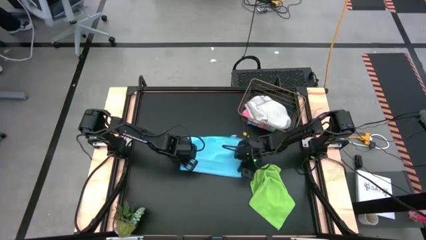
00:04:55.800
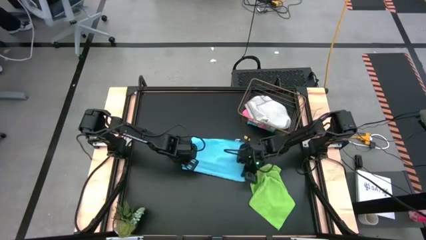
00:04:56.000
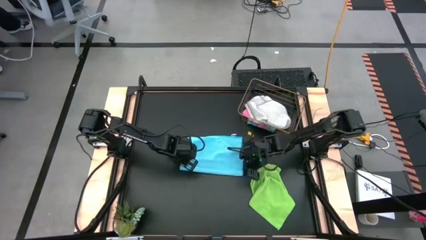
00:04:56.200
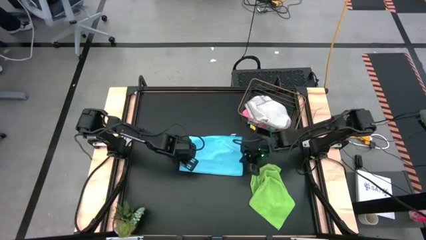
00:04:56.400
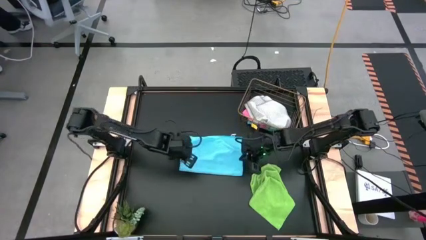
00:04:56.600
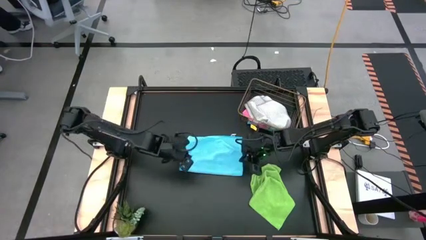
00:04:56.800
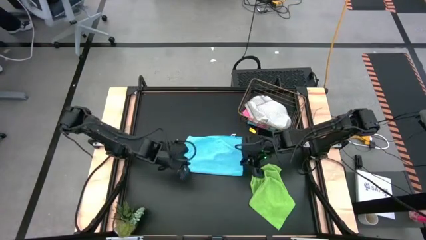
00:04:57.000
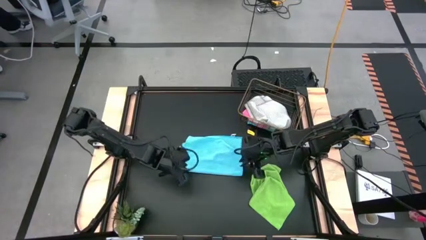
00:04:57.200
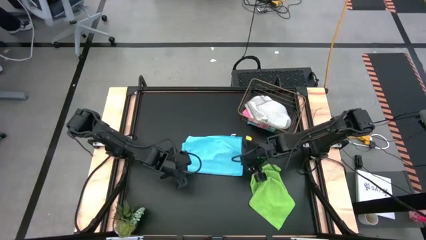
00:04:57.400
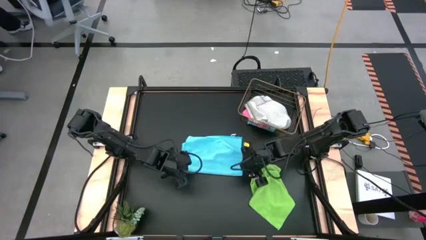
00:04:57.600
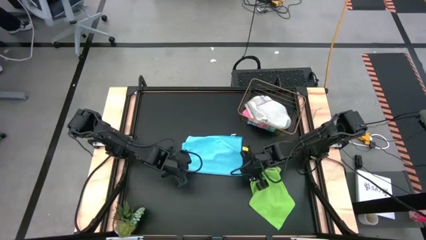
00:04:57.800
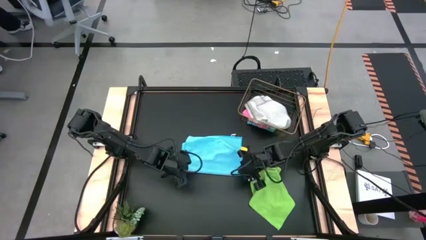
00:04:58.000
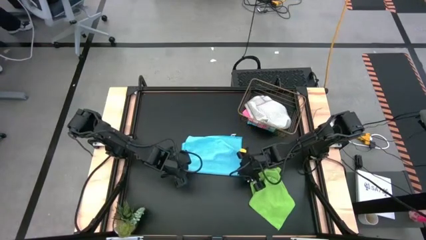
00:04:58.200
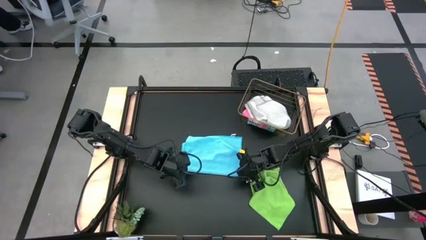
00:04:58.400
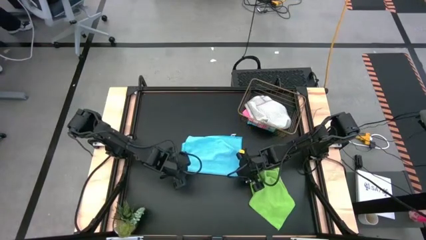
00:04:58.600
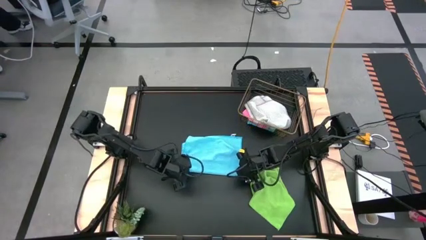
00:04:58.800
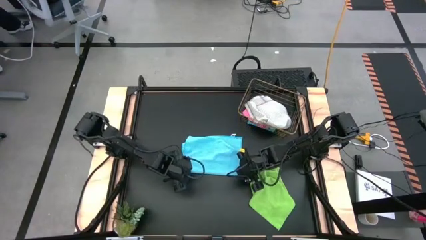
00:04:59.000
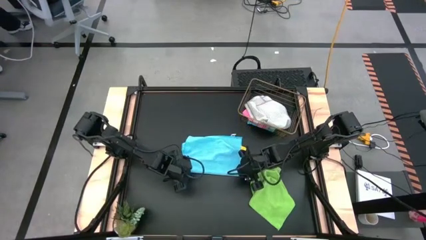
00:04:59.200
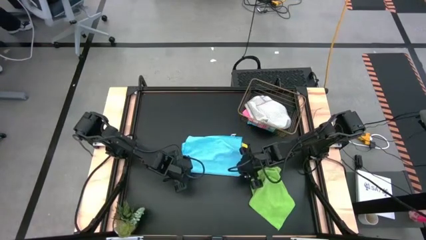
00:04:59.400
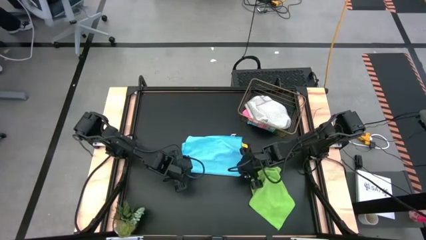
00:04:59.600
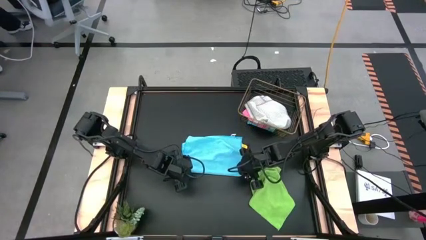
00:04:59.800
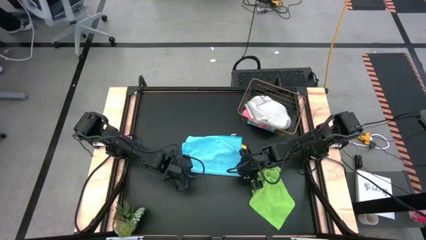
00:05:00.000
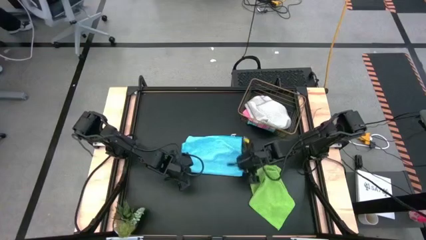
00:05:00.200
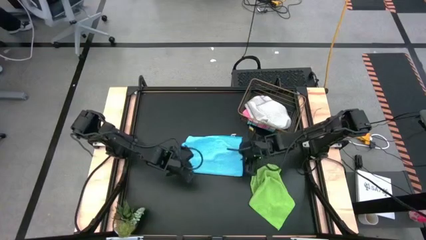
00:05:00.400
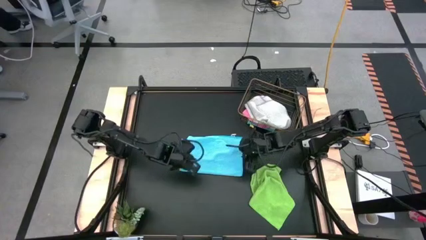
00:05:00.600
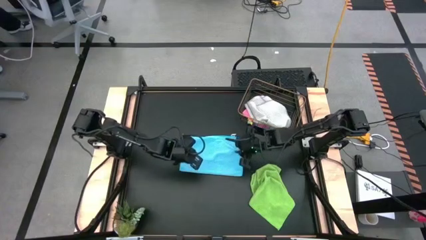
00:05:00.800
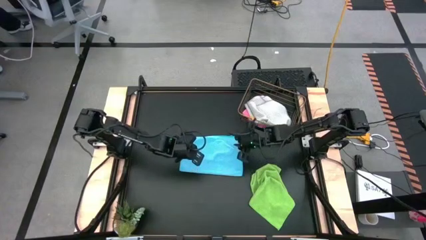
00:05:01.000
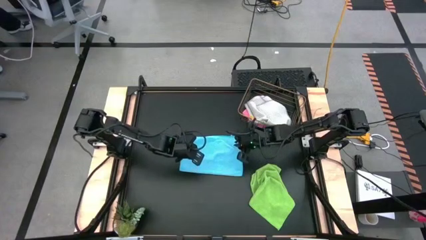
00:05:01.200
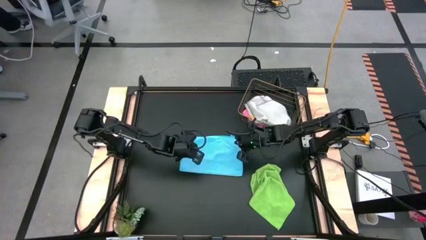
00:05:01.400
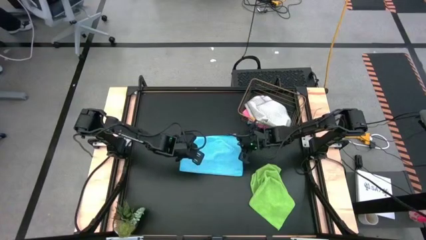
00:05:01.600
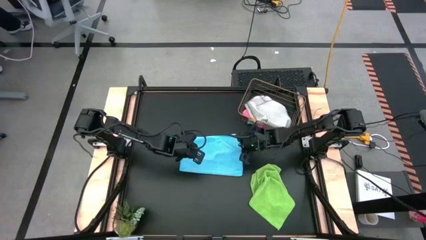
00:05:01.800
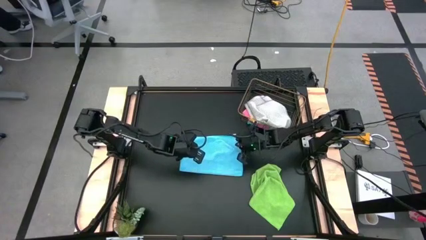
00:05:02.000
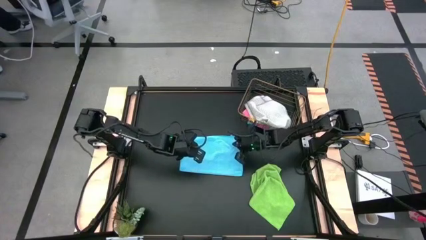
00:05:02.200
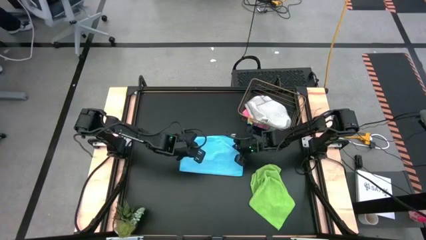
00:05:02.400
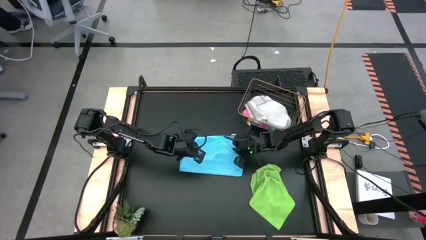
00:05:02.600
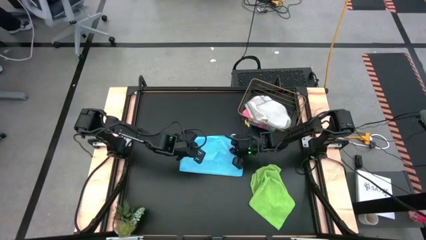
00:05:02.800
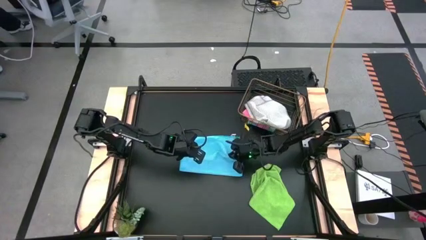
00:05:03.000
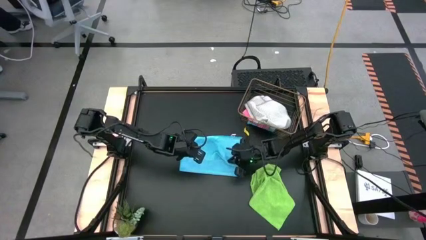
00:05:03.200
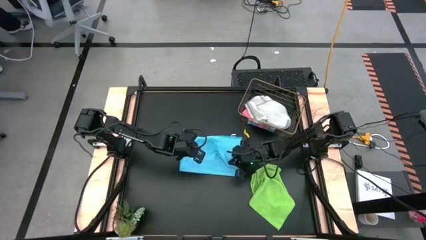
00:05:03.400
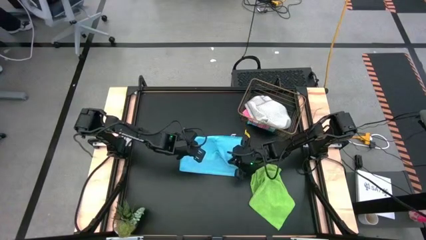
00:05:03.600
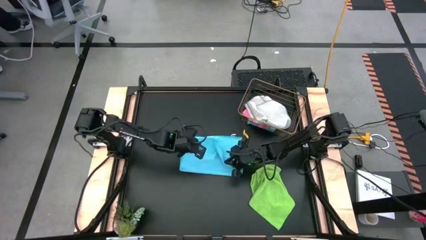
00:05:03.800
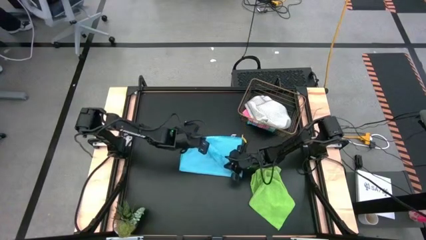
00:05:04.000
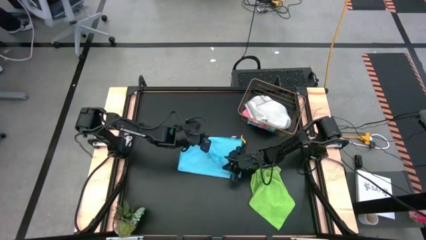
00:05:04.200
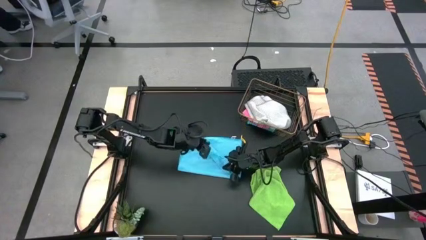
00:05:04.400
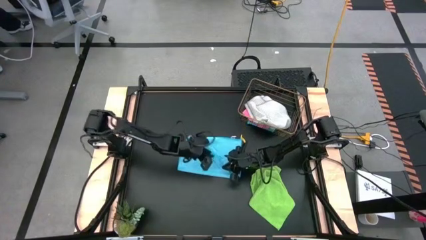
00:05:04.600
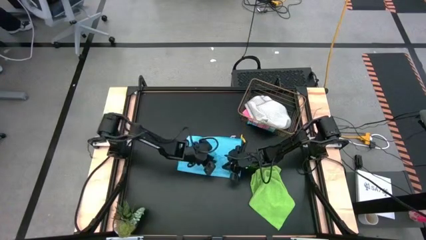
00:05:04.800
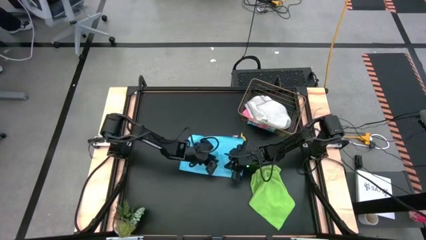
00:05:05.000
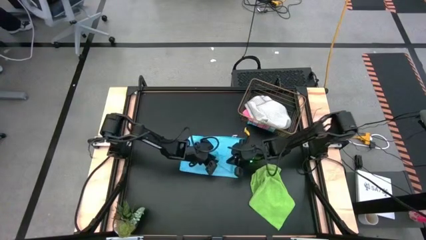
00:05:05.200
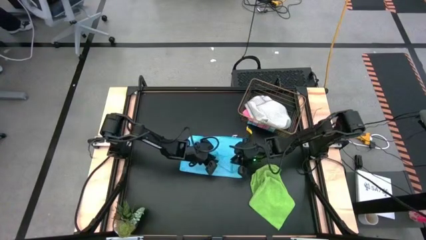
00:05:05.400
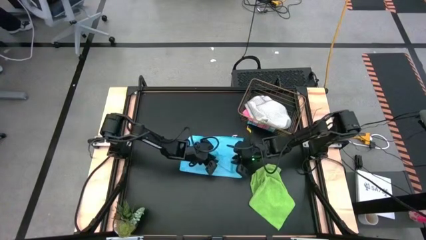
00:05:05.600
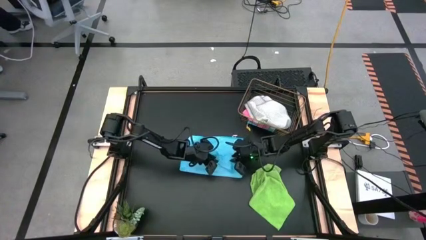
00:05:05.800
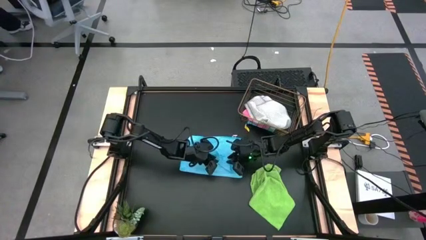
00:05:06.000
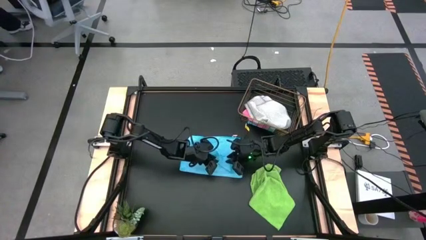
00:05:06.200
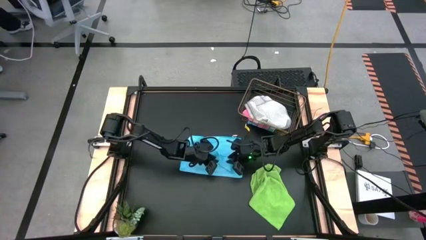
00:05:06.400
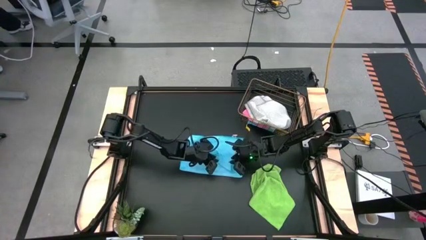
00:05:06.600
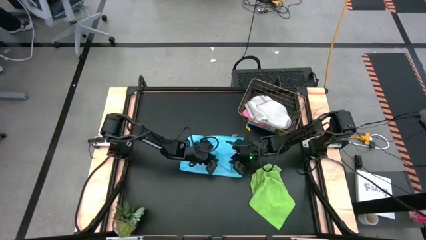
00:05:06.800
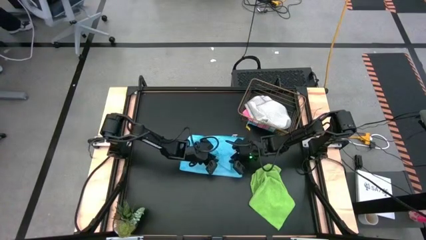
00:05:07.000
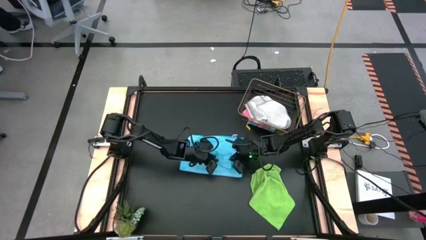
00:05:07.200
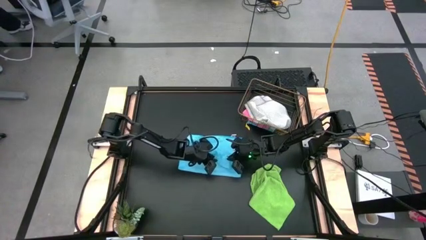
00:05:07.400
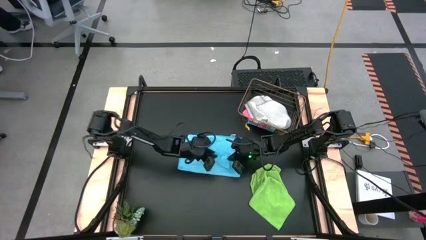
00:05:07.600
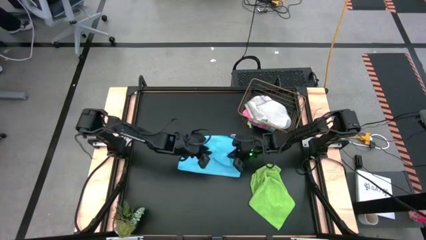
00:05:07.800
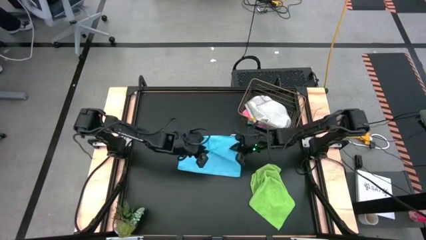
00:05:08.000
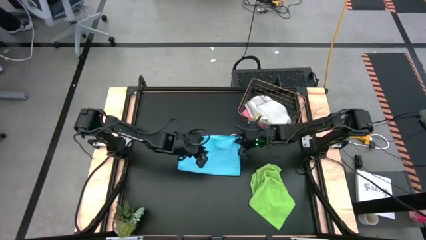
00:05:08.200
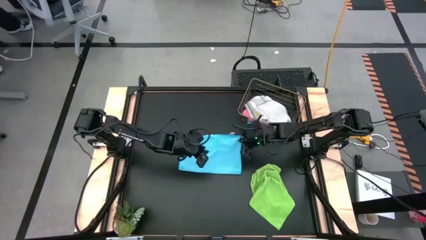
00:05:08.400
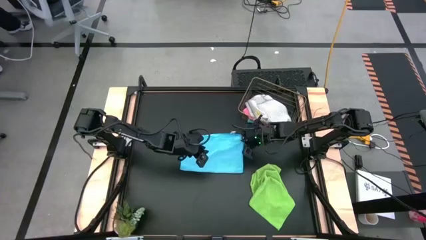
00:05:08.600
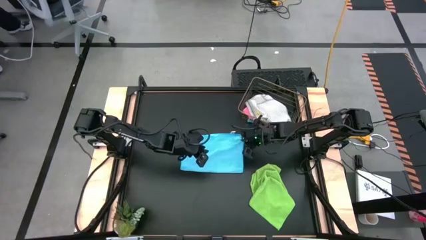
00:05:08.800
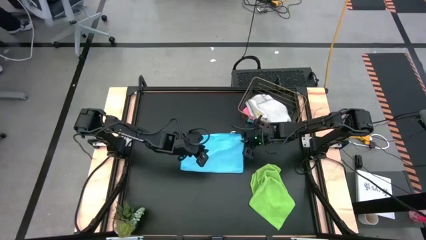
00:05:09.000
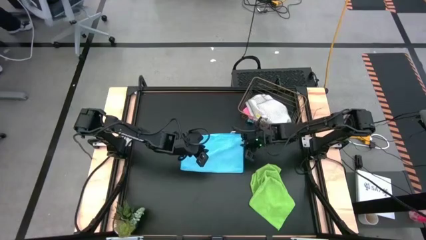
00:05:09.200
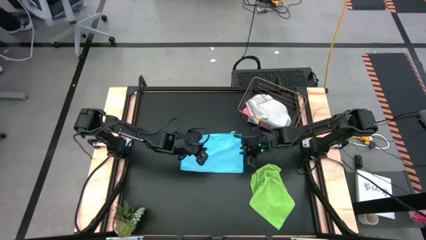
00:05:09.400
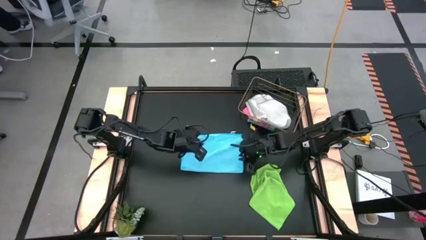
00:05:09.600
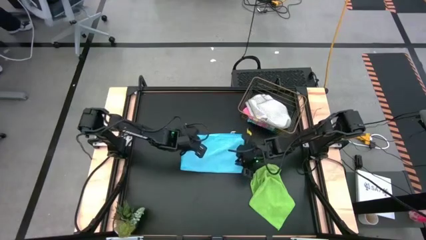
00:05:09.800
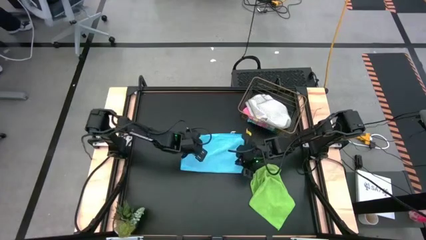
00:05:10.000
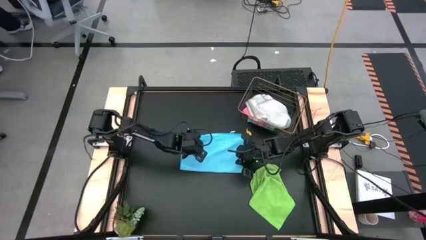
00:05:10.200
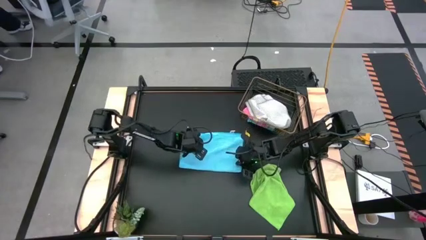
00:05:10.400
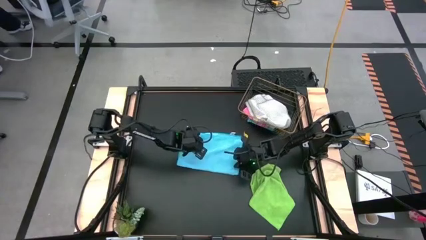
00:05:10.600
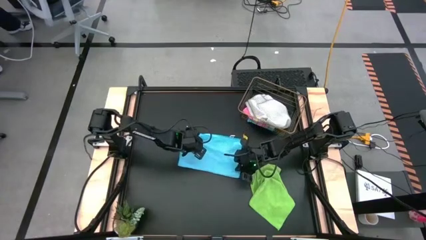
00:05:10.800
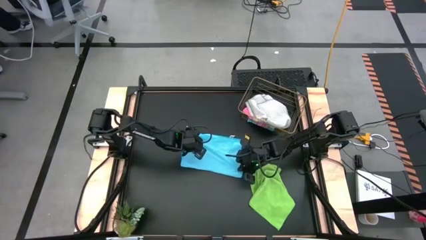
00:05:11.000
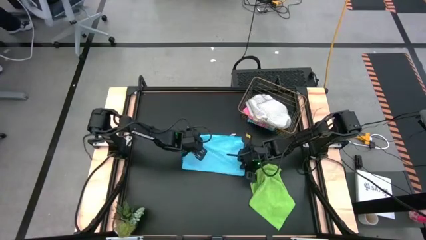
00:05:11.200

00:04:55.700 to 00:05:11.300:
Task: Fold microfiber towels
Fold the blue towel

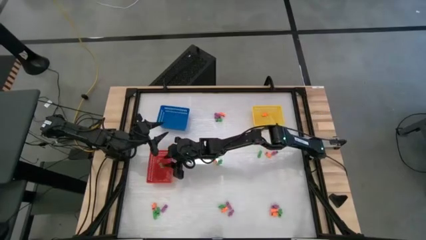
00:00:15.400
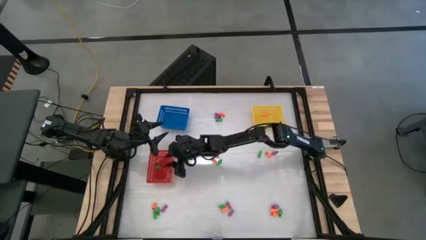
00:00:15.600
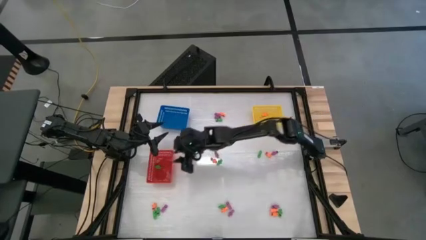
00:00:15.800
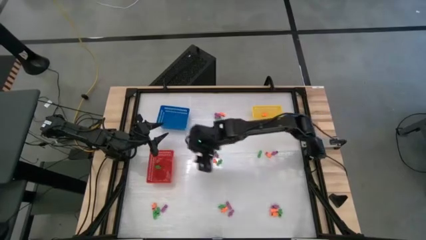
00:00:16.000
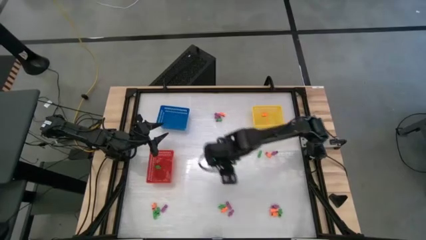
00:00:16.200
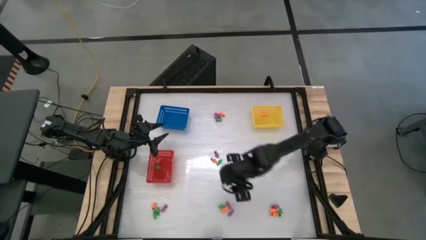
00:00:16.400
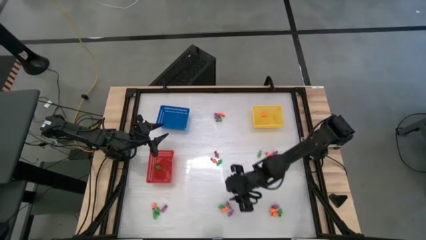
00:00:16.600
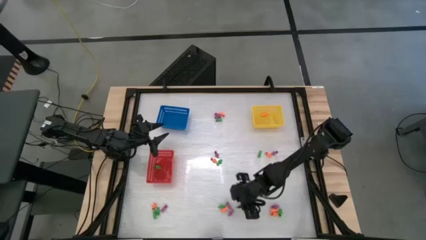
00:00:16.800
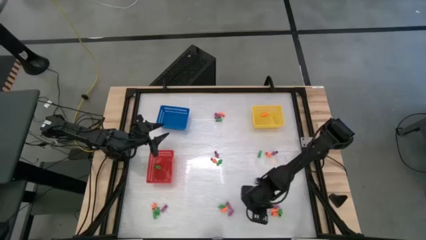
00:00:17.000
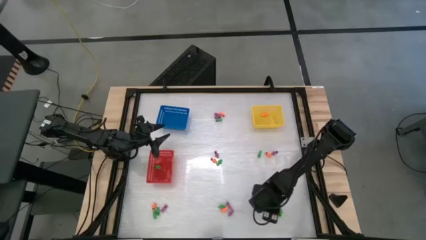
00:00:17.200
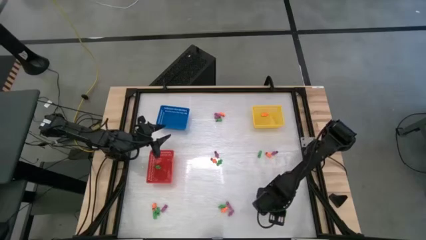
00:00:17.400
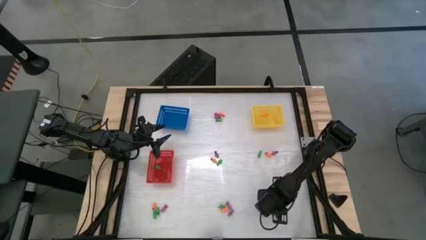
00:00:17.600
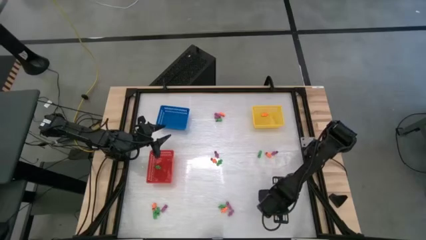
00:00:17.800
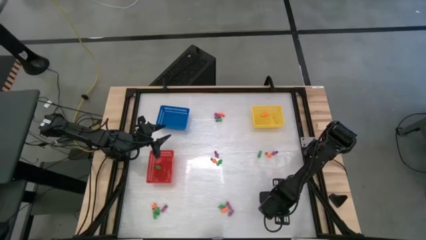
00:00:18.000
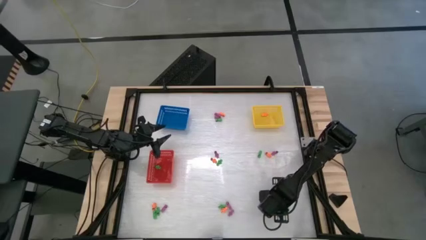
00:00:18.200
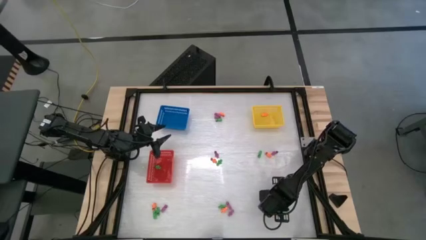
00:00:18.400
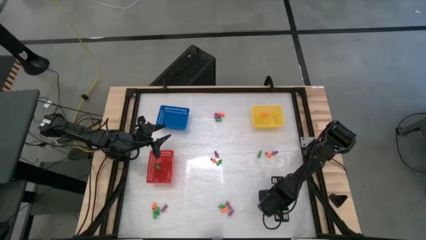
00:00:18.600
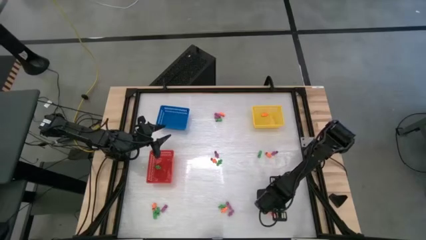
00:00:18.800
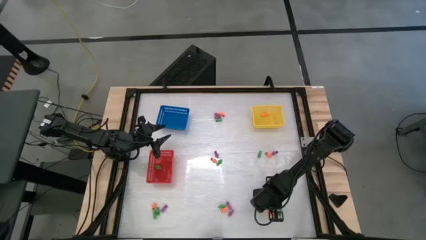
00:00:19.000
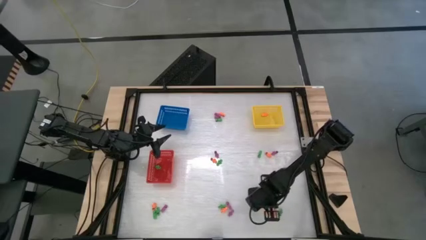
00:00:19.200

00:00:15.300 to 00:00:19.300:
Task: Sort Halloween decoration
Put the violet skeleton toy into the blue bin
